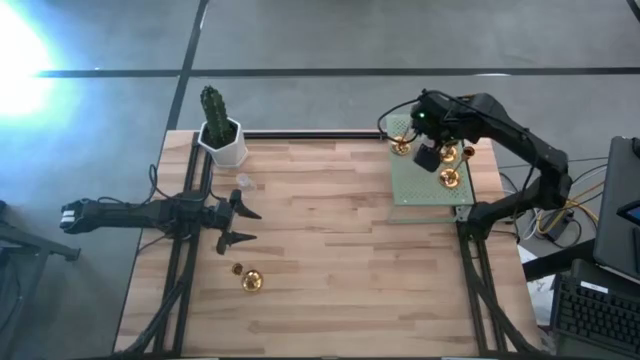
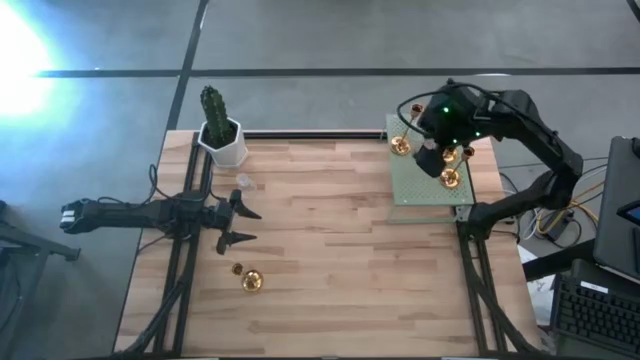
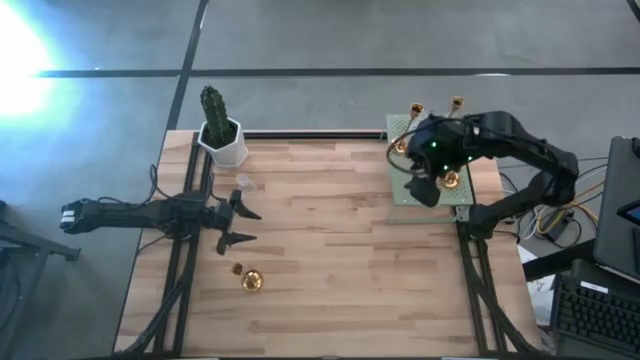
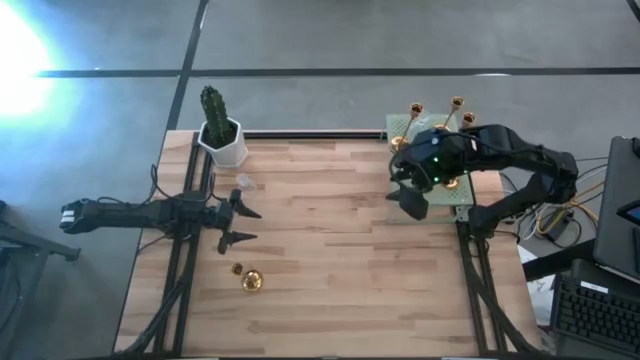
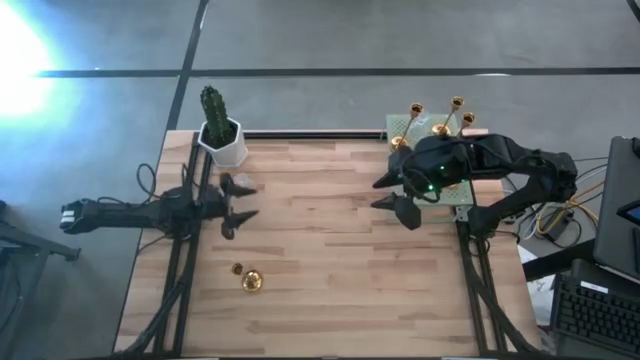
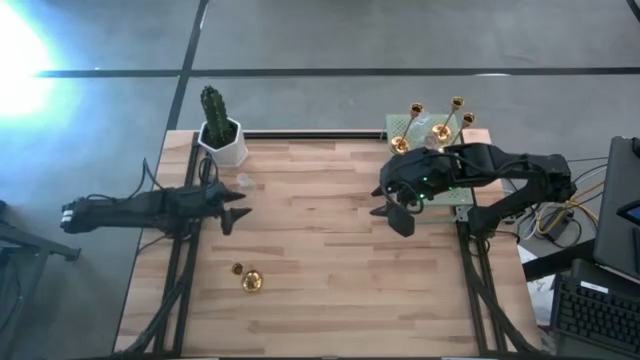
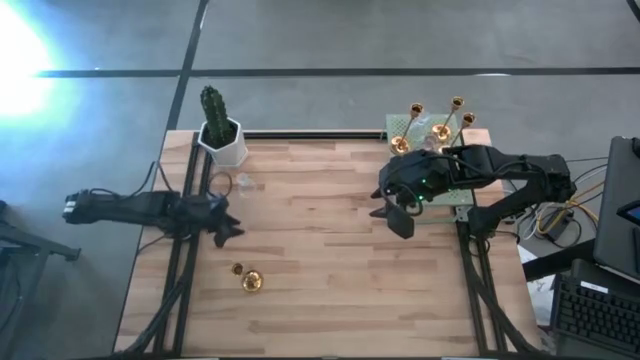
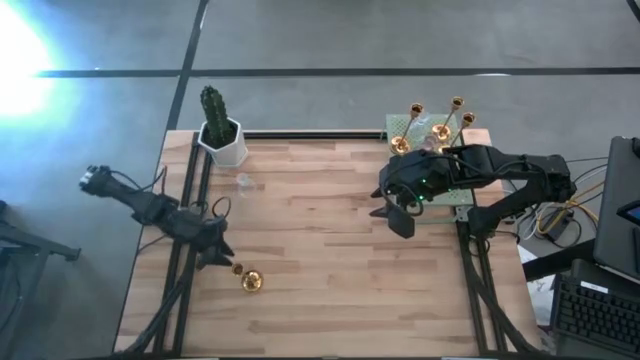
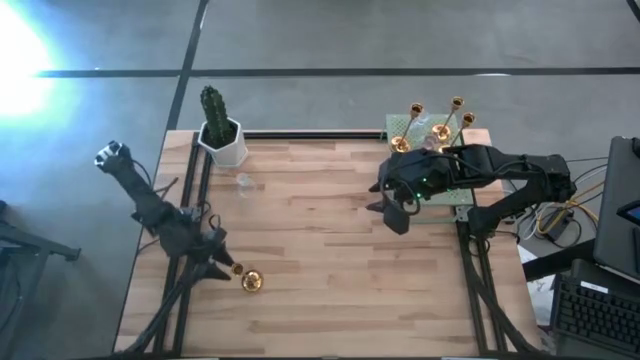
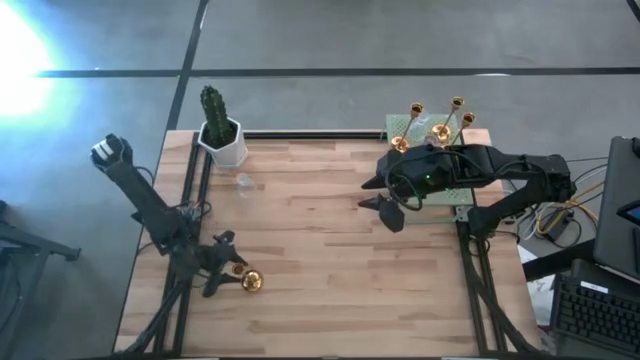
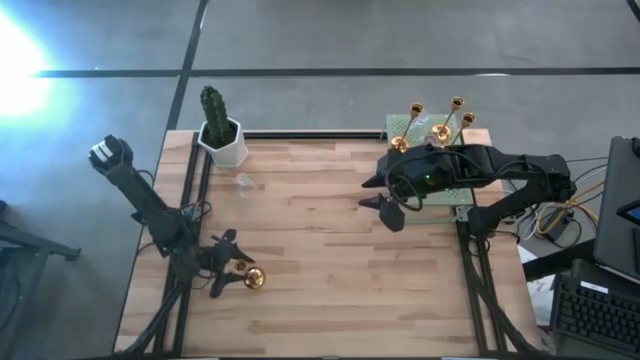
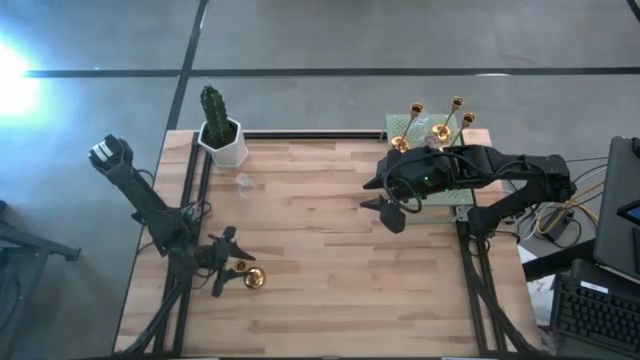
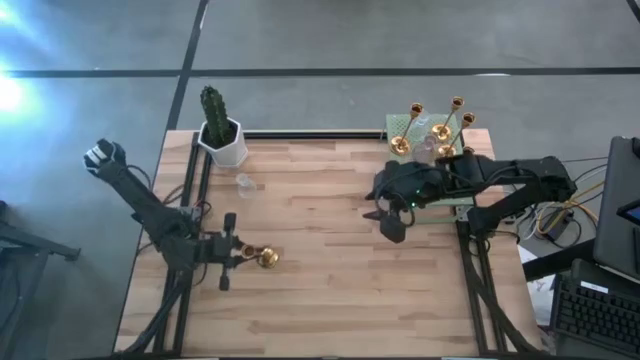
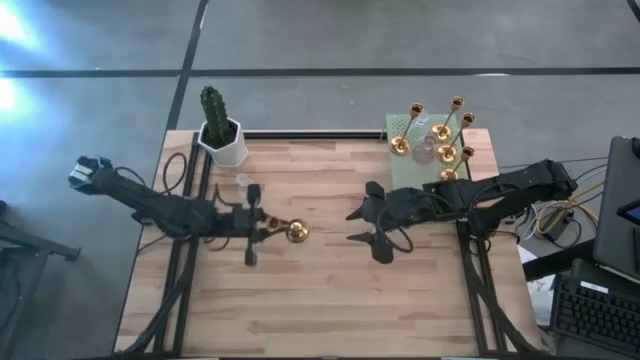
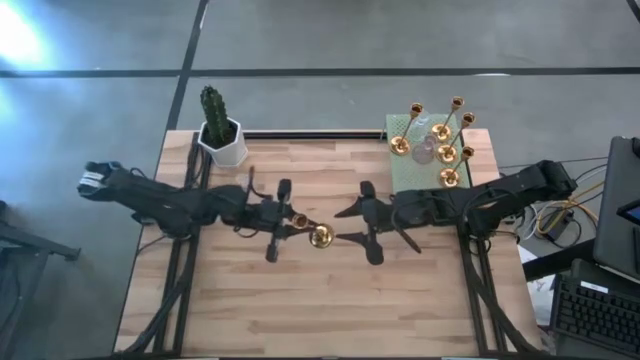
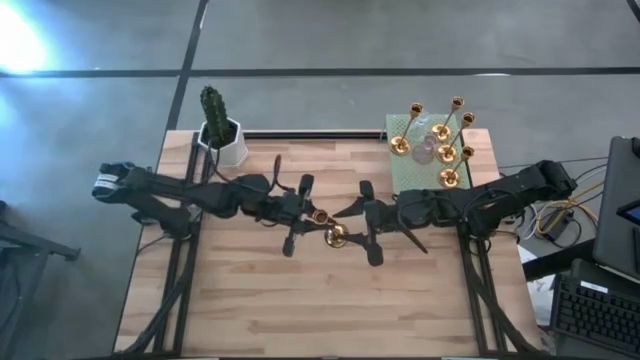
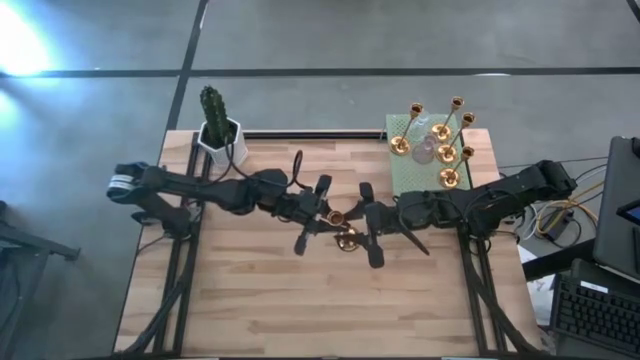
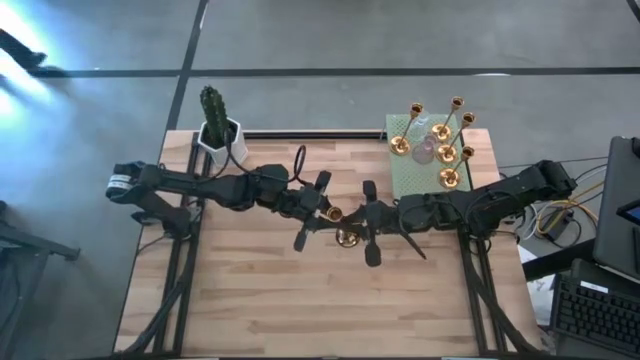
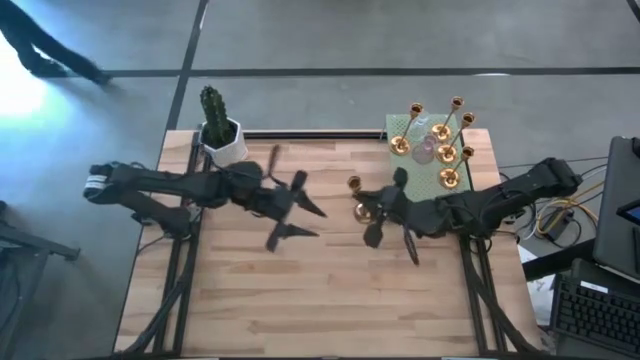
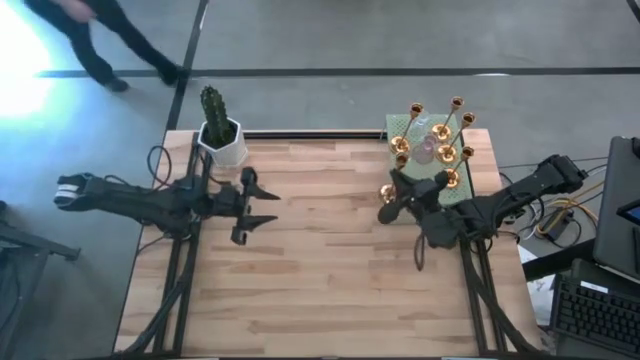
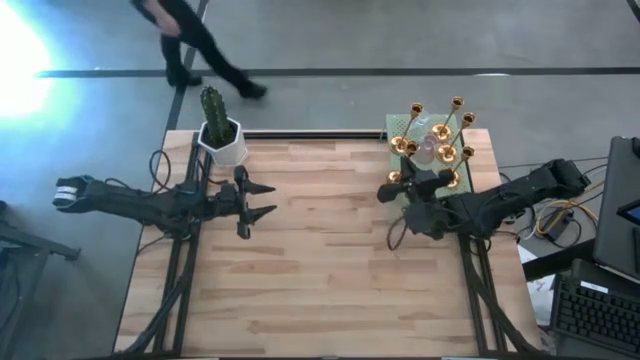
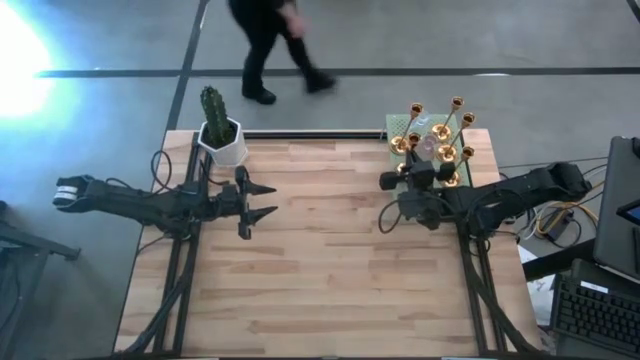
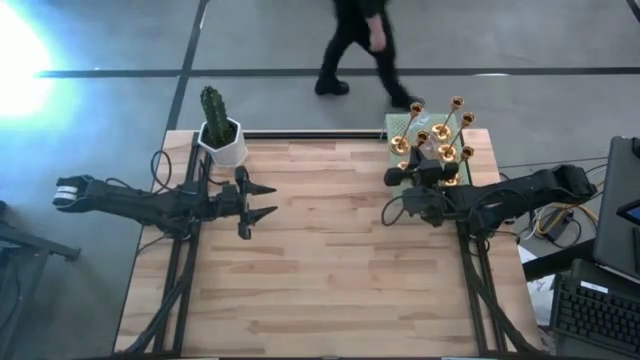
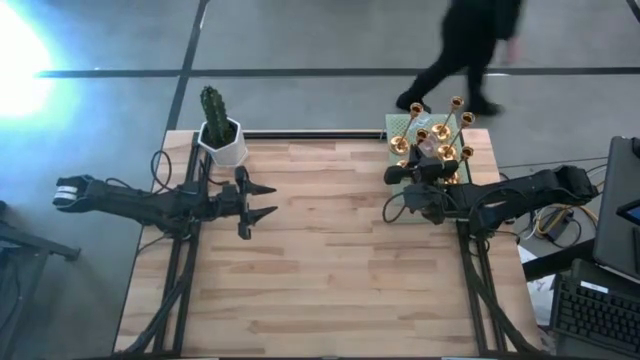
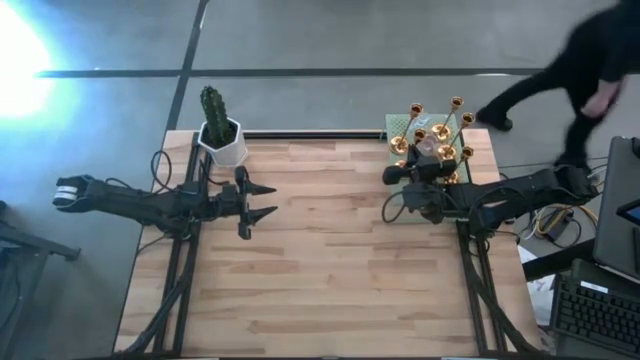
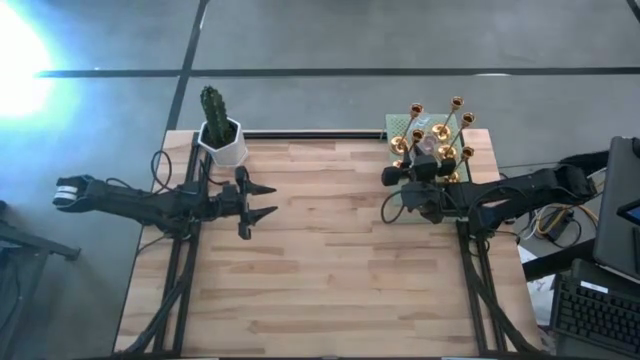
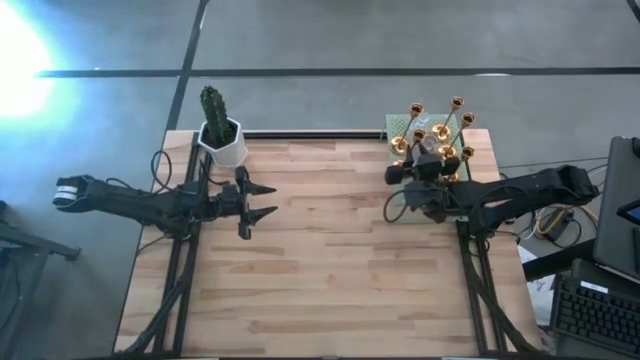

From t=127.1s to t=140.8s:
Task: Pick & Place candle stick holders
Put the gold candle holder on the shelf

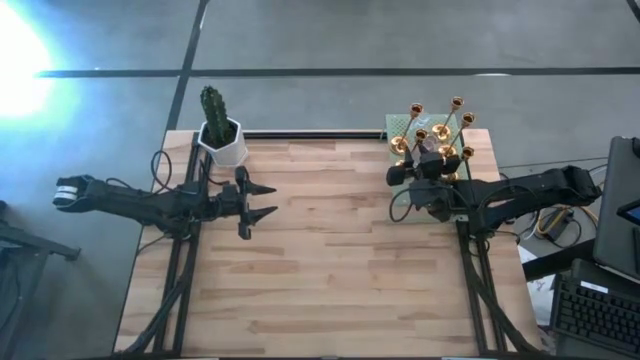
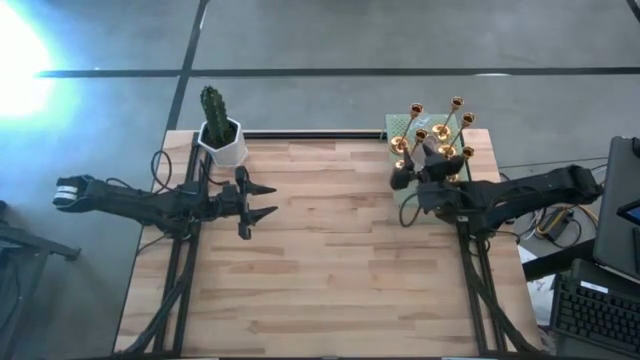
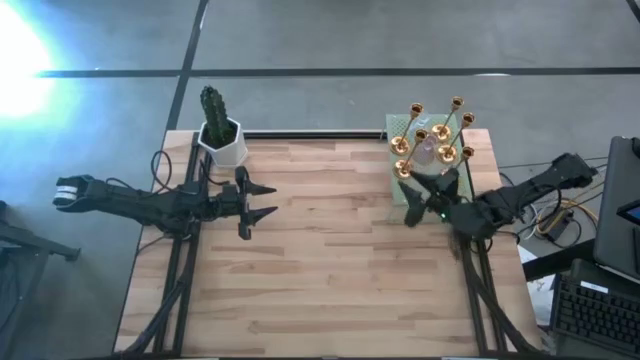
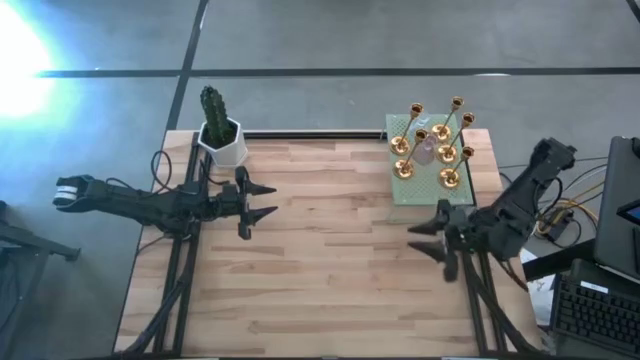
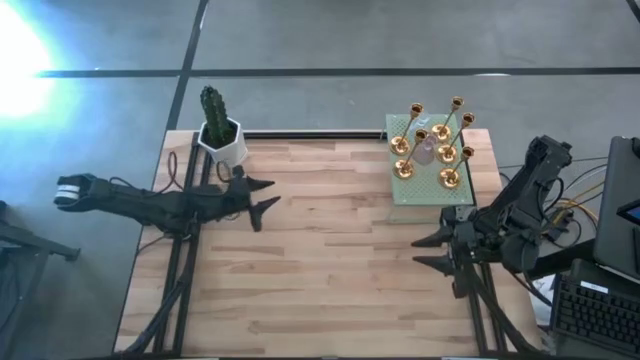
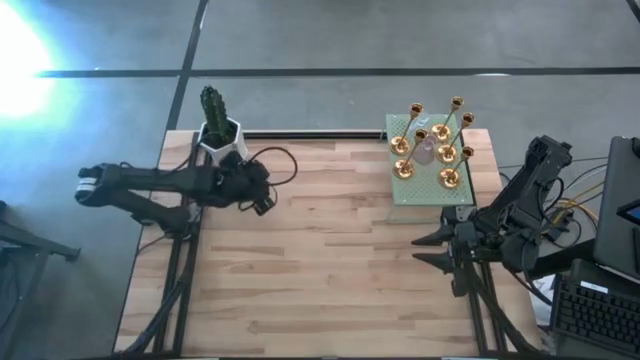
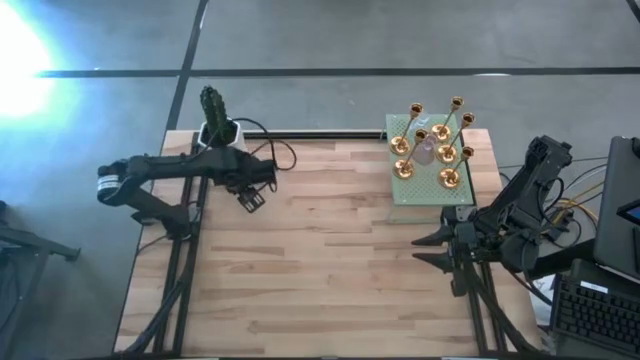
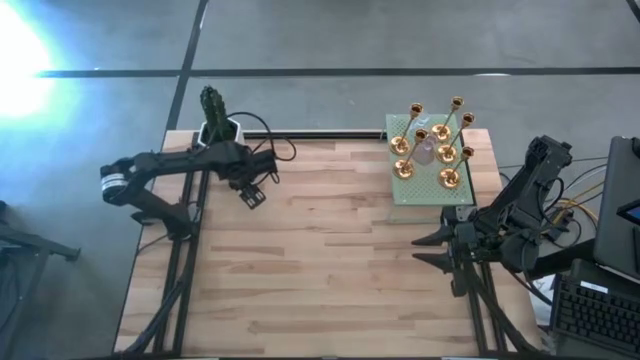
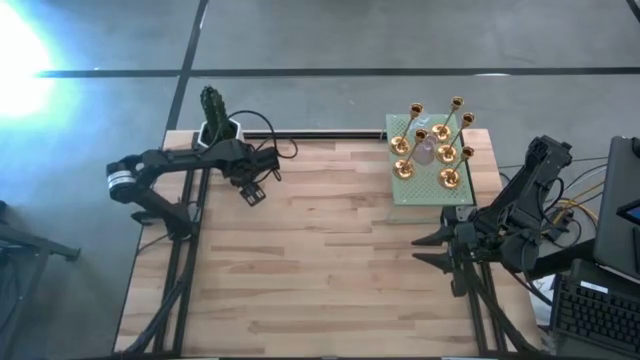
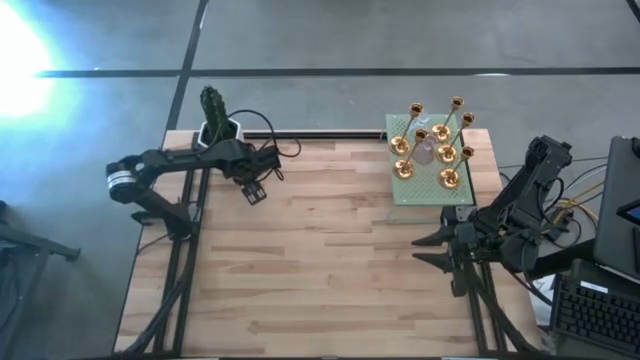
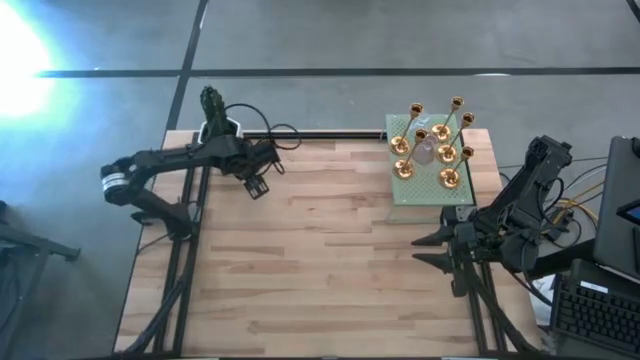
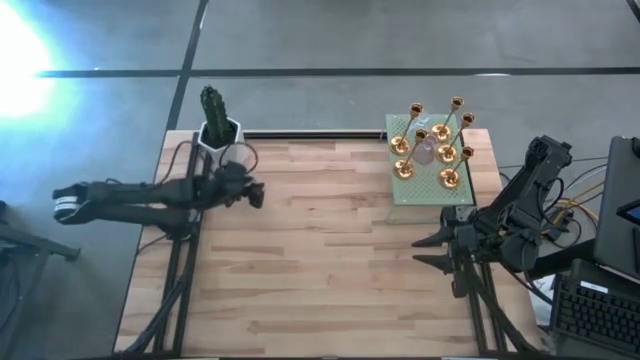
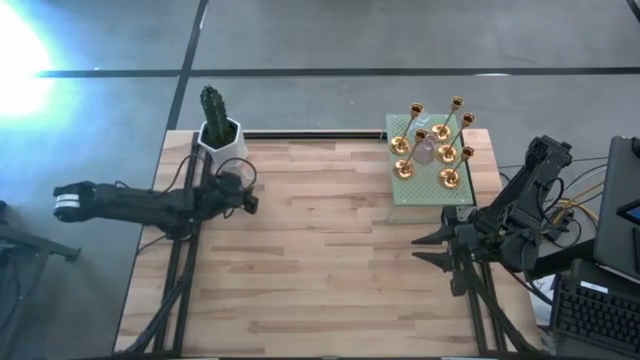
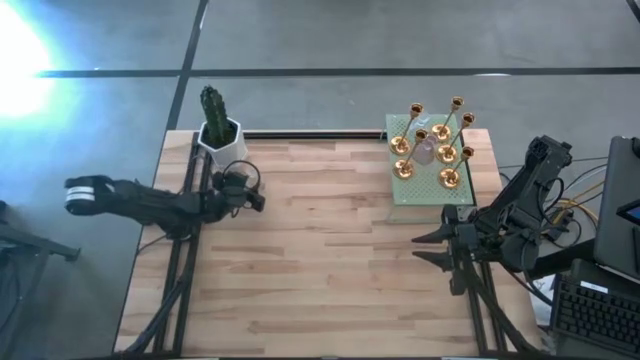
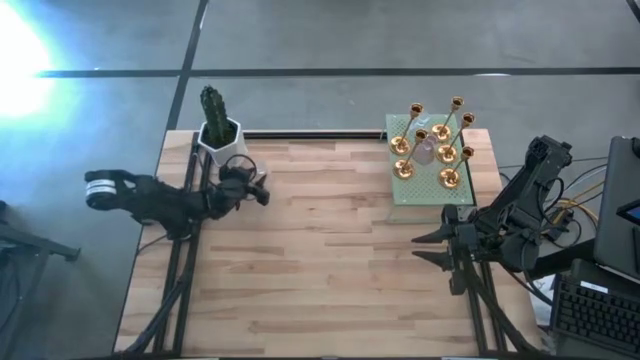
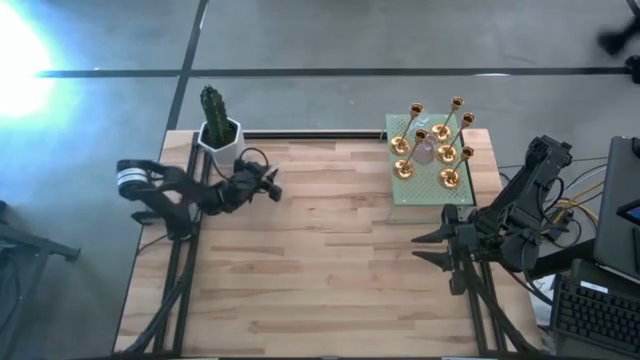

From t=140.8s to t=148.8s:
Put the transparent glass candle holder on the shelf
